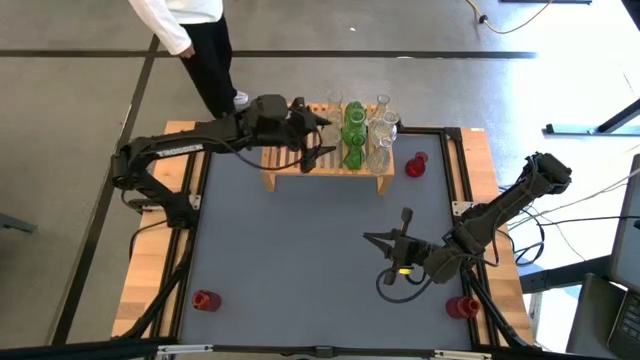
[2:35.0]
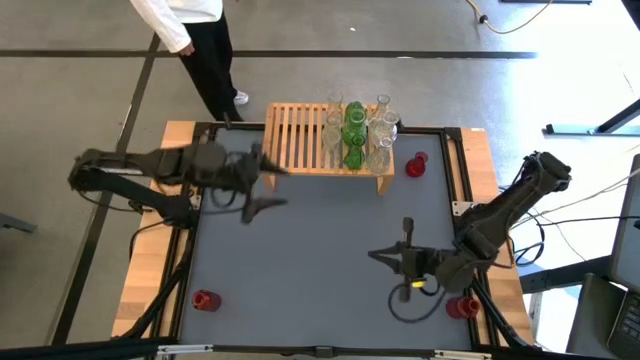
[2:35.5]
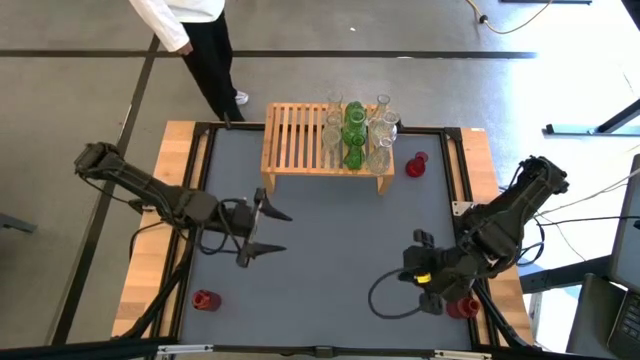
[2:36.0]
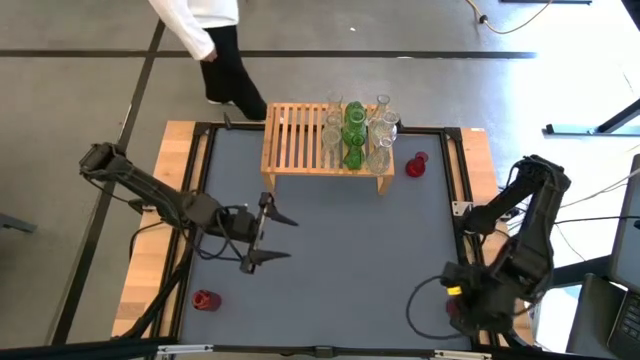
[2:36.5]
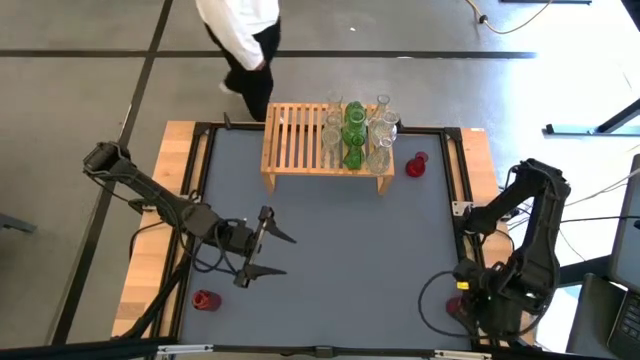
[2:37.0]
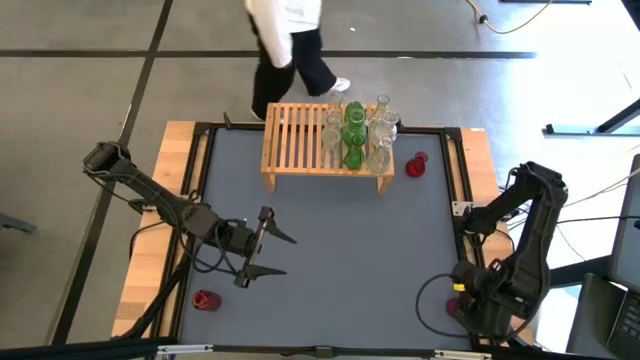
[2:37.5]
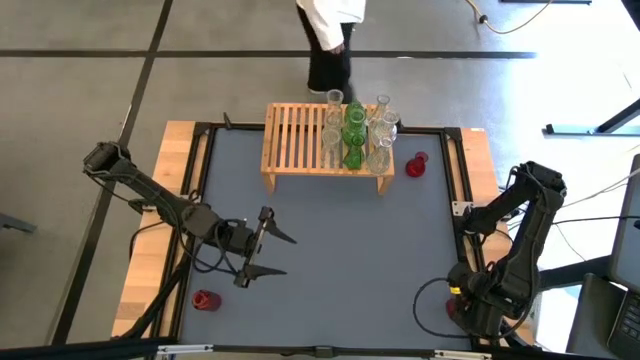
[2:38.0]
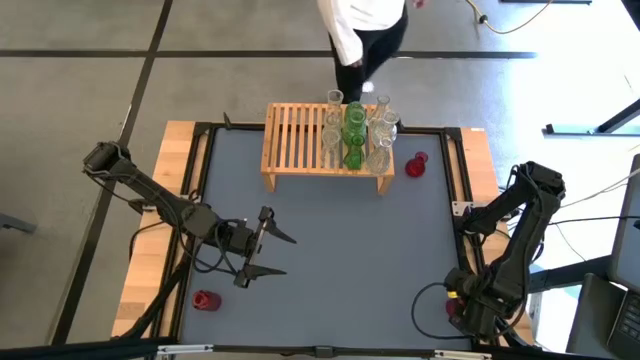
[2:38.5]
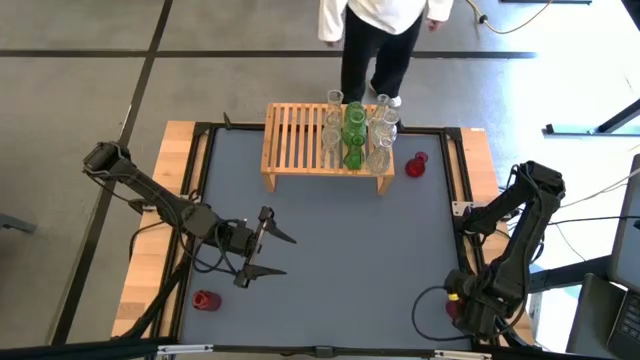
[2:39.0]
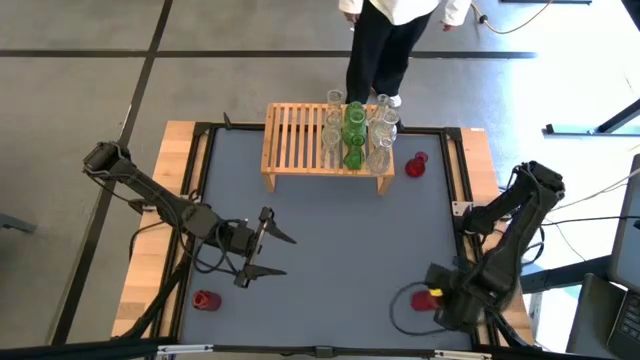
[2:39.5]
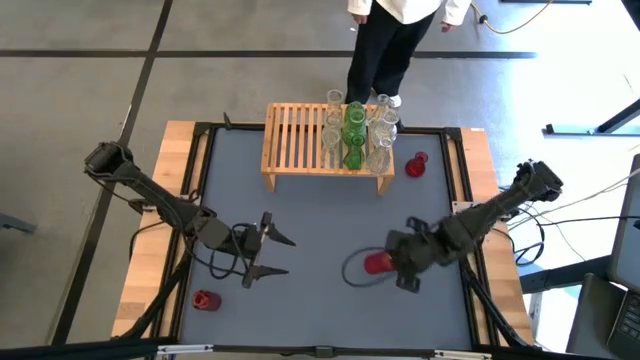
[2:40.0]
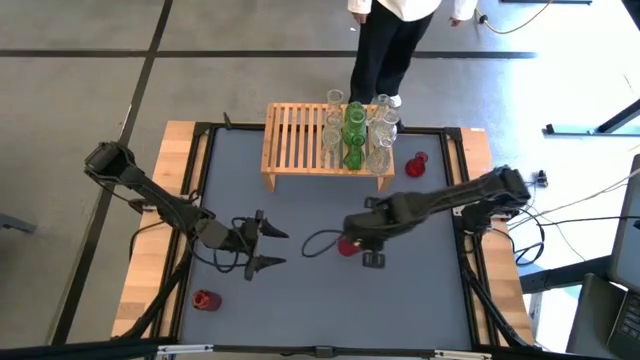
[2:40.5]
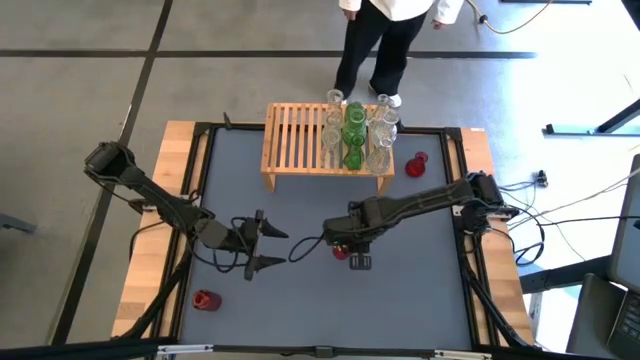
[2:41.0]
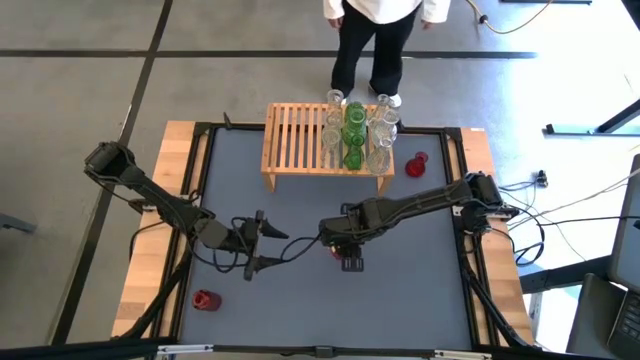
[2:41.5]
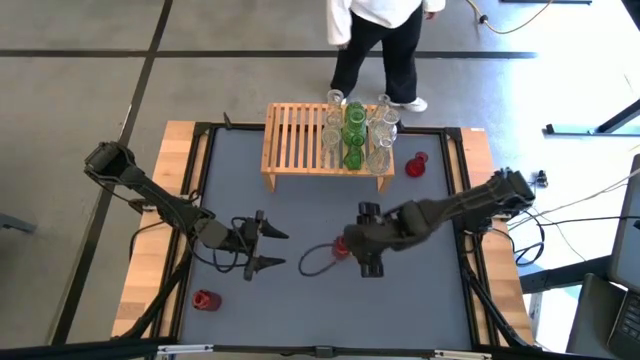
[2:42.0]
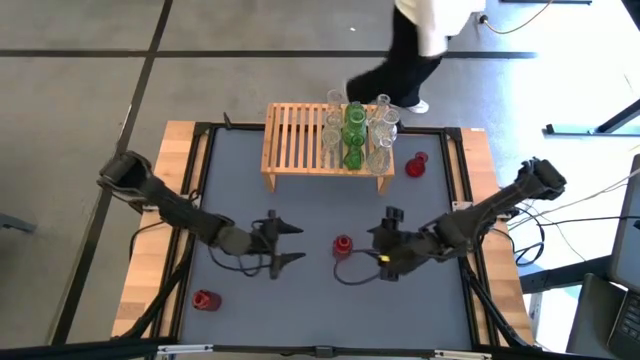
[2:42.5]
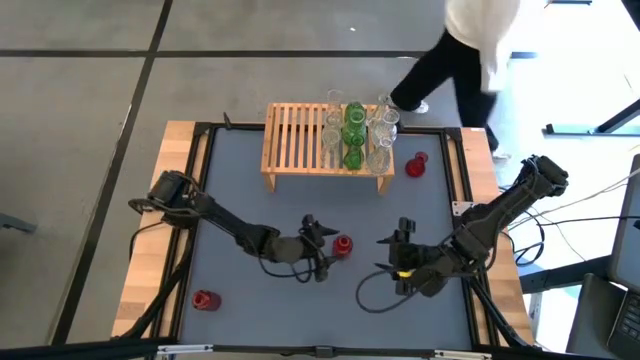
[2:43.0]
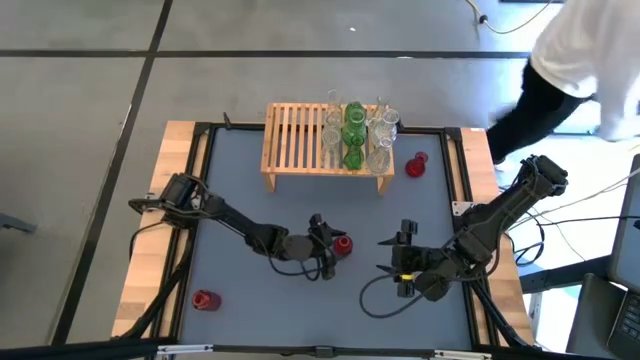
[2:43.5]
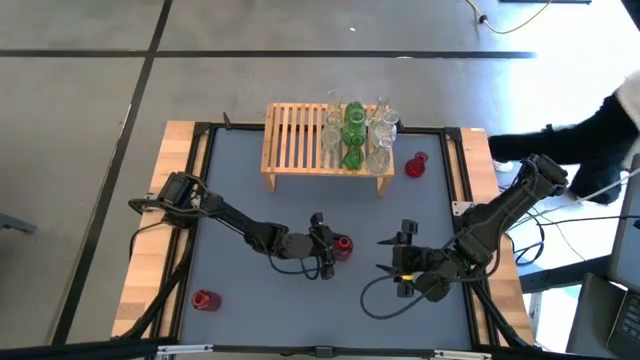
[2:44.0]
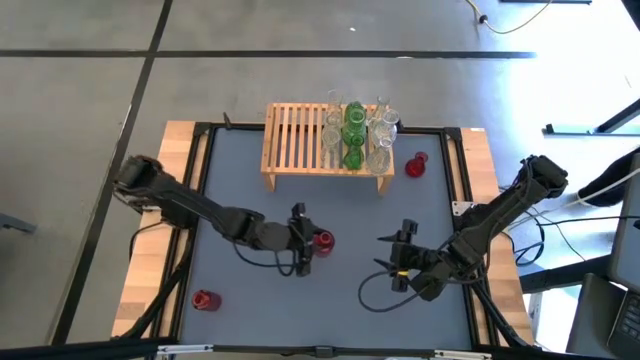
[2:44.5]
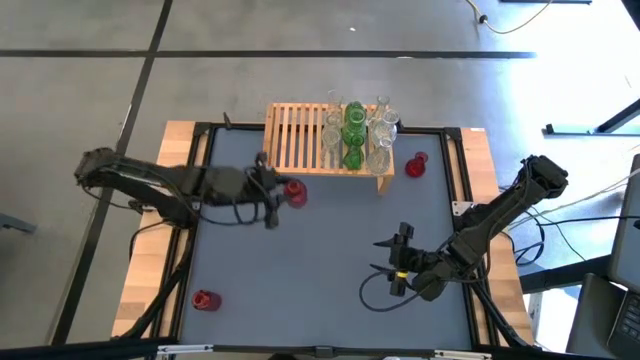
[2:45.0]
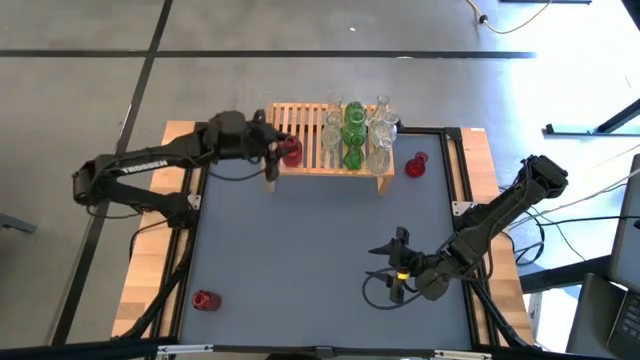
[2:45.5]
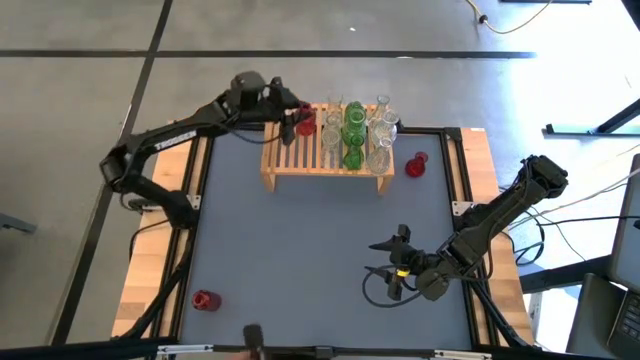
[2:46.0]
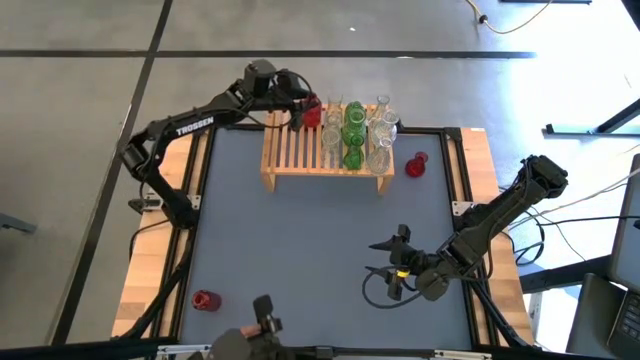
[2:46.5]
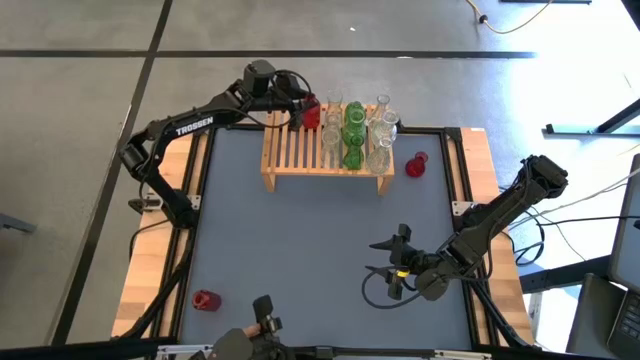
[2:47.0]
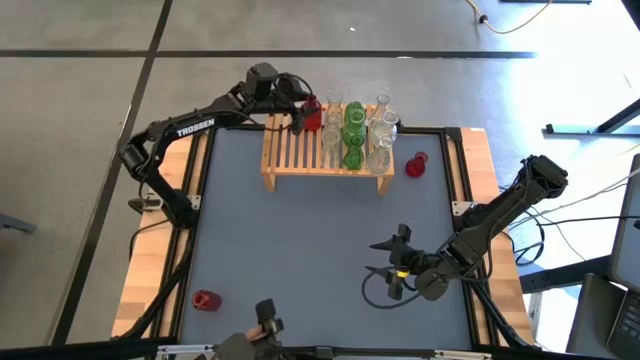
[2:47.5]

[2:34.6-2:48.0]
Task: sort vases onto shelf
Put the red vase on the shelf

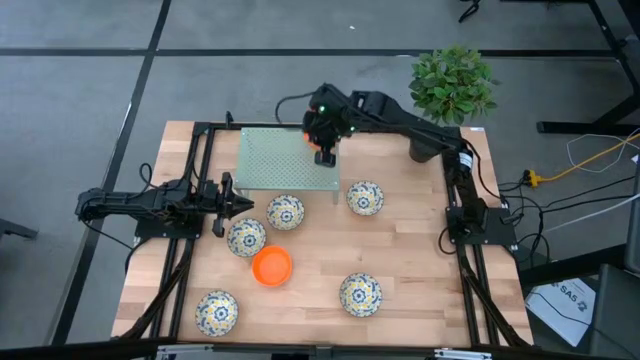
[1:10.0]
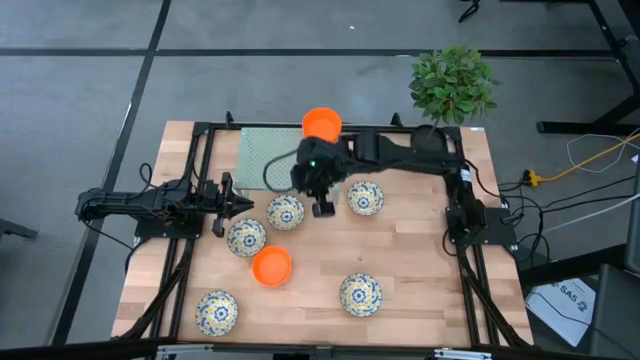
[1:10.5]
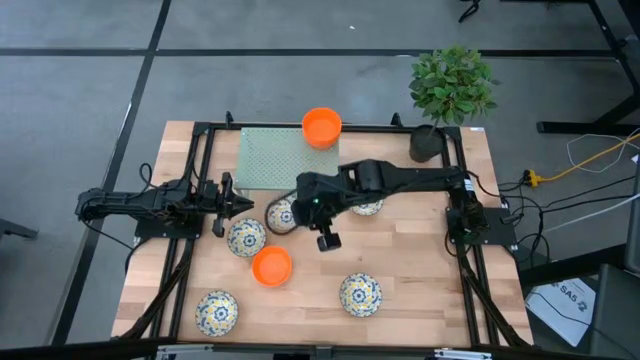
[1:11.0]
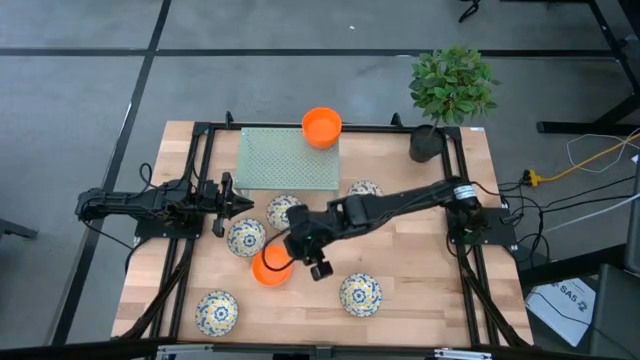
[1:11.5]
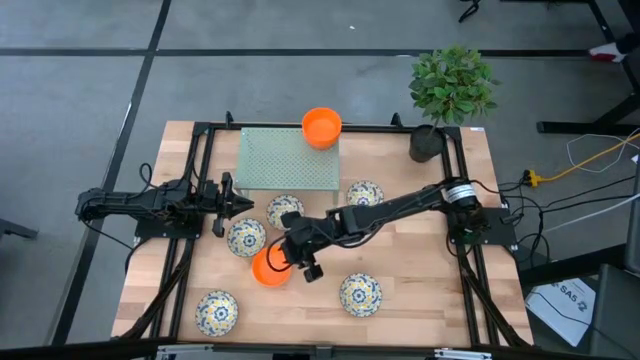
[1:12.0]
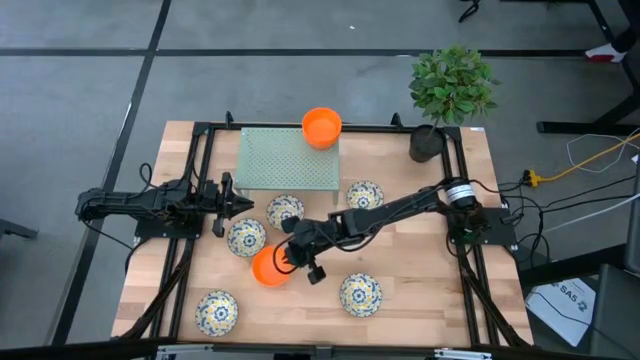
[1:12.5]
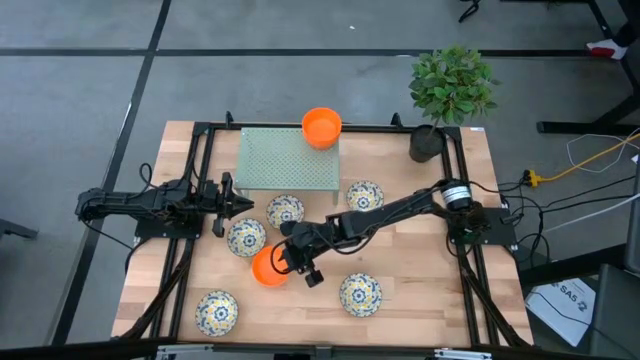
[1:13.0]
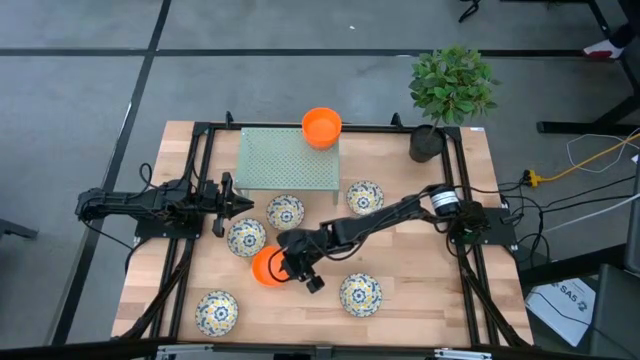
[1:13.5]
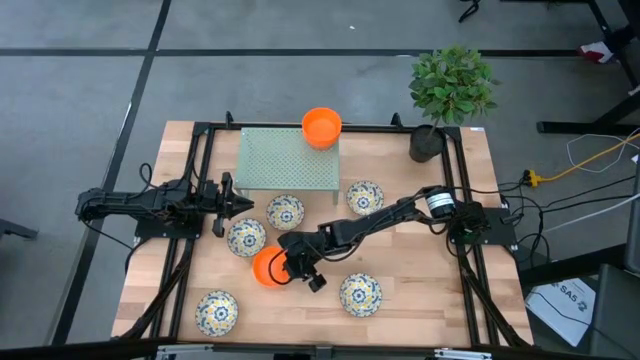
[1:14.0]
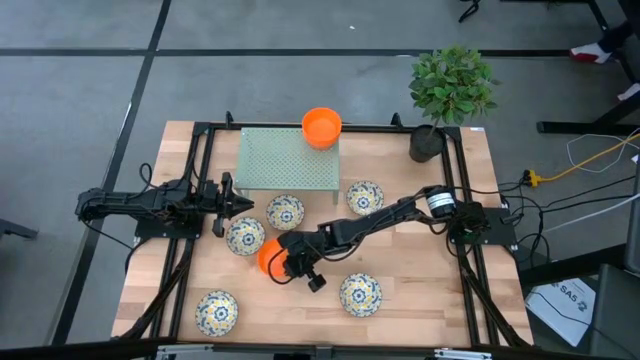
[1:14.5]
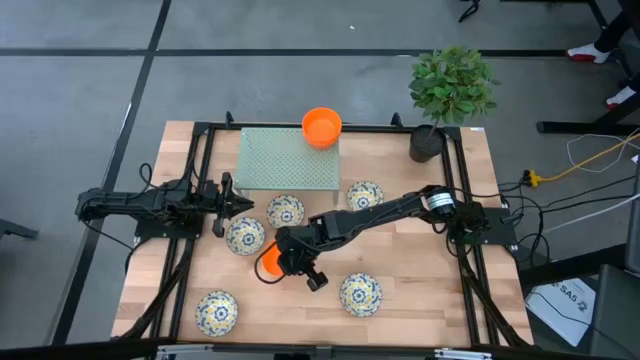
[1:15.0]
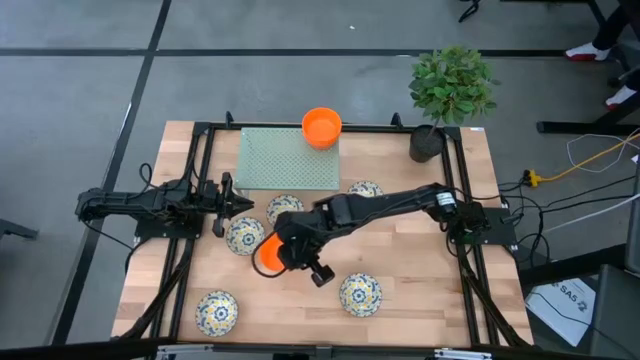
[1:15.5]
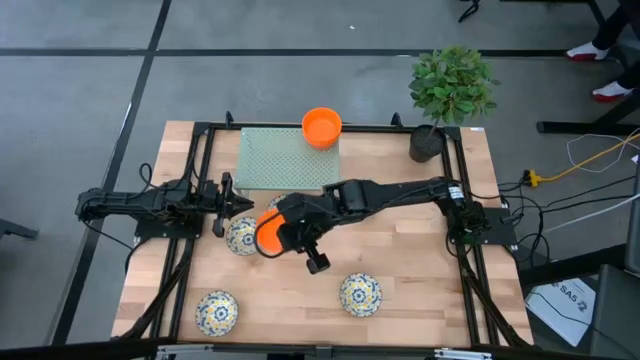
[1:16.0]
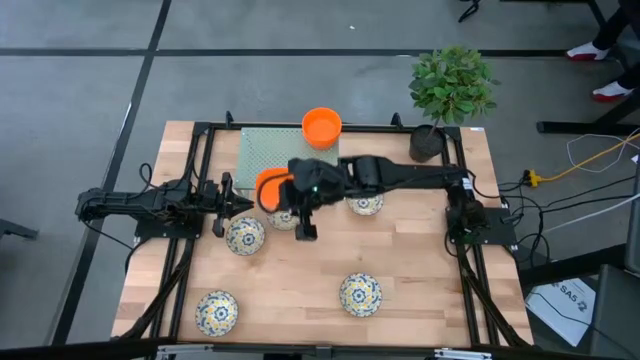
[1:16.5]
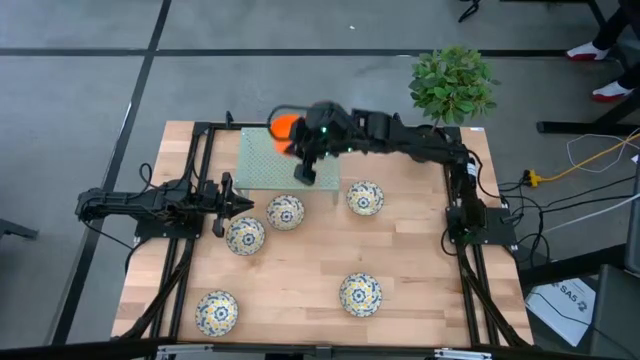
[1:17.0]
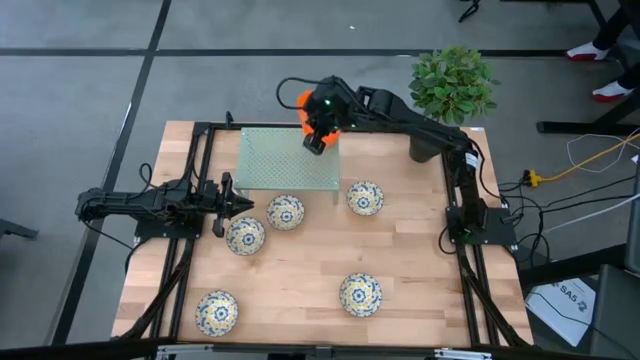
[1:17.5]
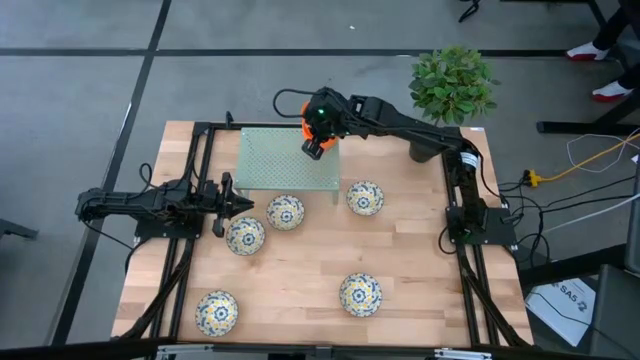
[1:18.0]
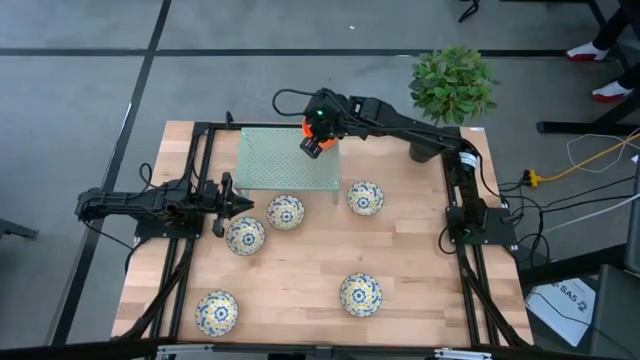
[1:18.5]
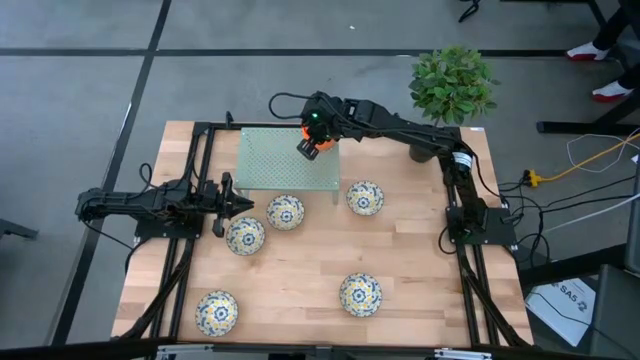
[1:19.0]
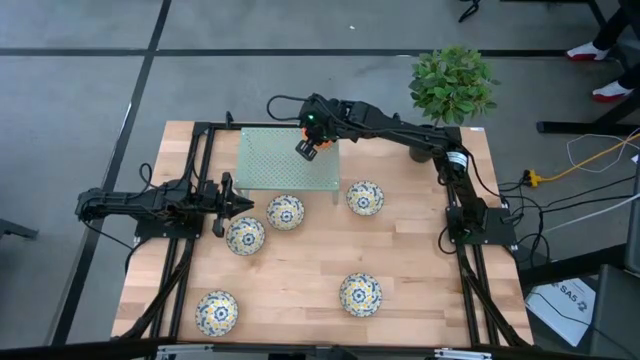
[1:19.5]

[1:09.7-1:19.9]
Task: Pick & Place Mini bowls
Stack the orange bowl on top of the other orange bowls on the shelf
